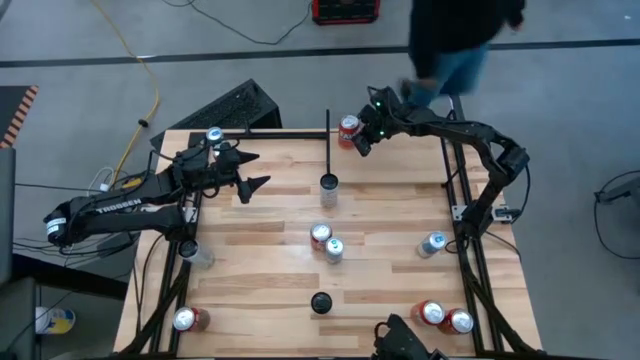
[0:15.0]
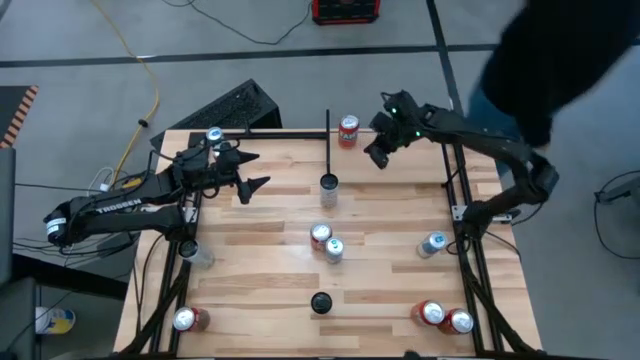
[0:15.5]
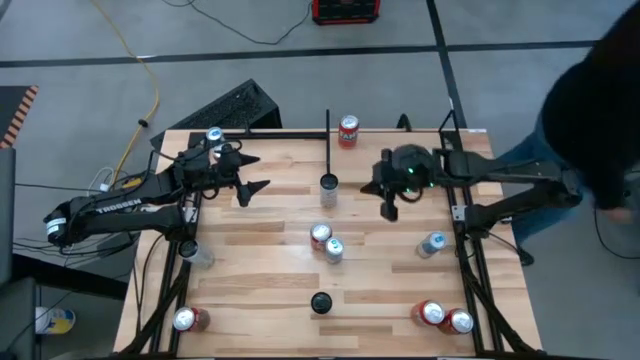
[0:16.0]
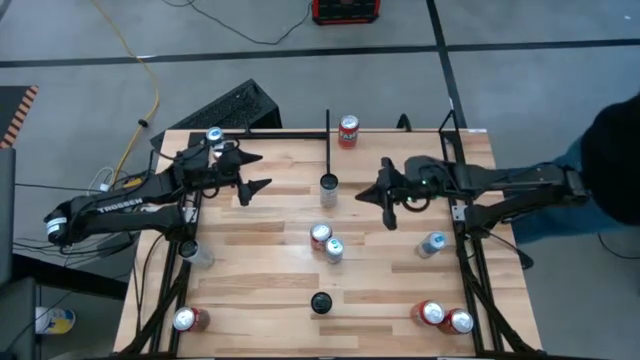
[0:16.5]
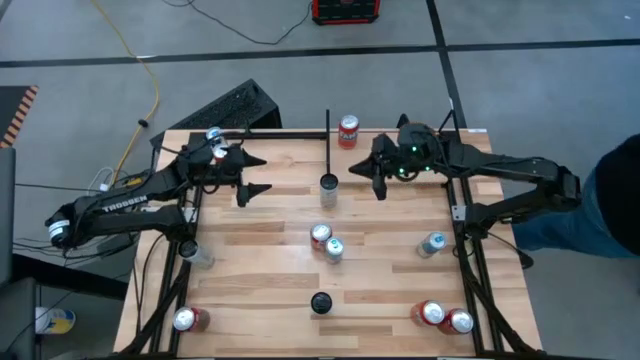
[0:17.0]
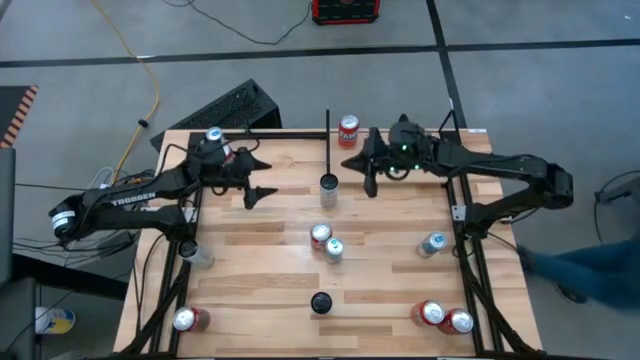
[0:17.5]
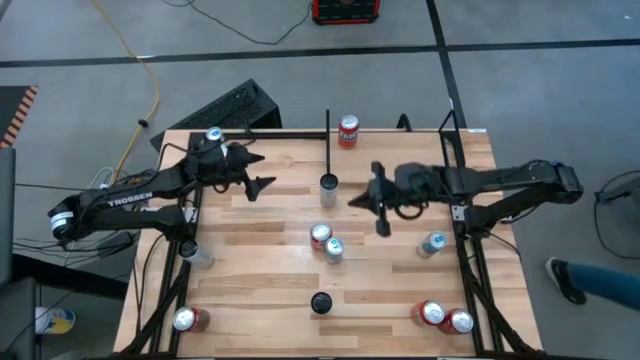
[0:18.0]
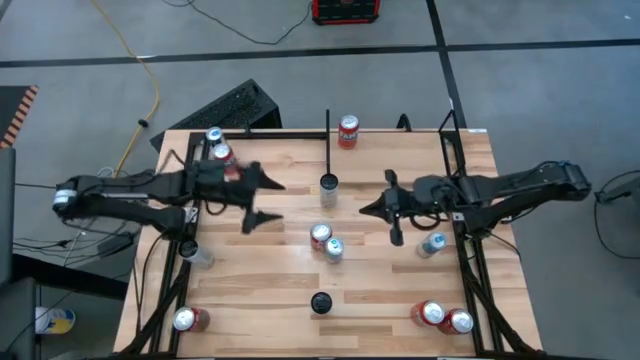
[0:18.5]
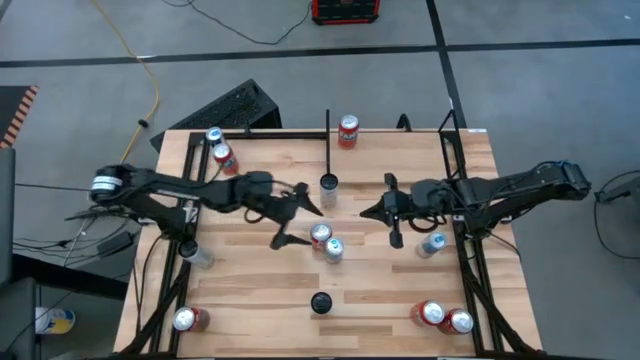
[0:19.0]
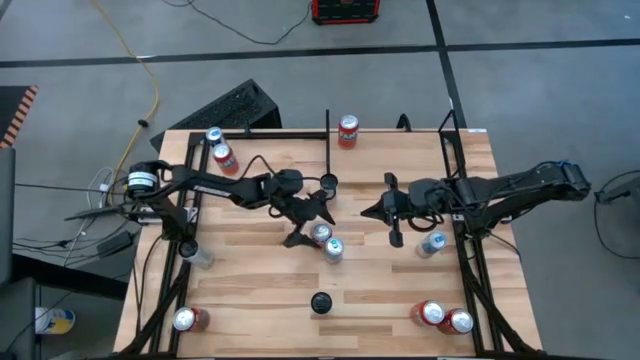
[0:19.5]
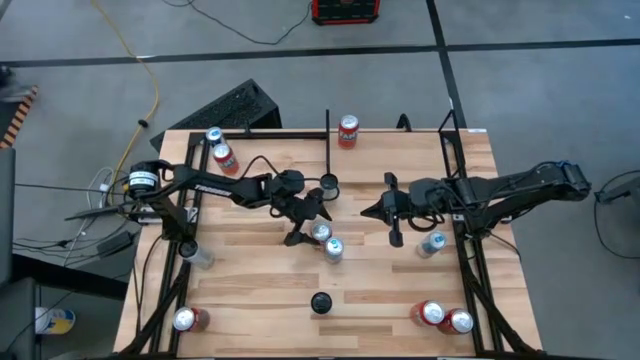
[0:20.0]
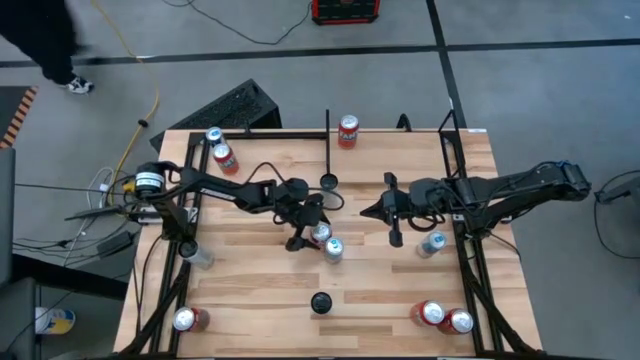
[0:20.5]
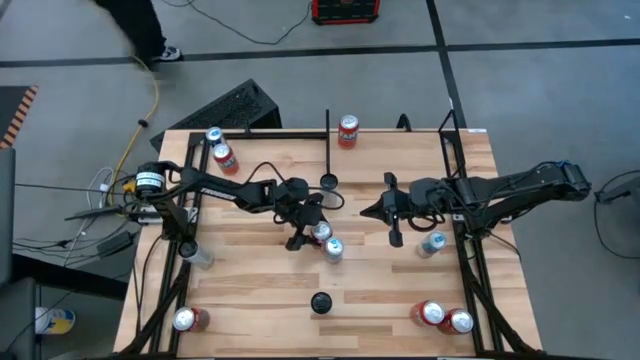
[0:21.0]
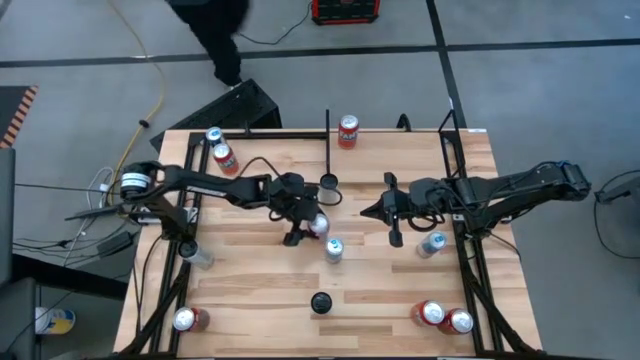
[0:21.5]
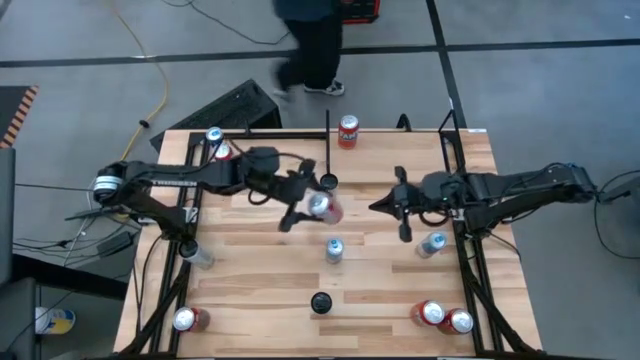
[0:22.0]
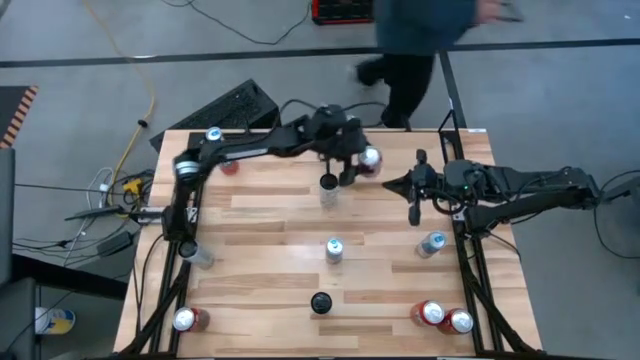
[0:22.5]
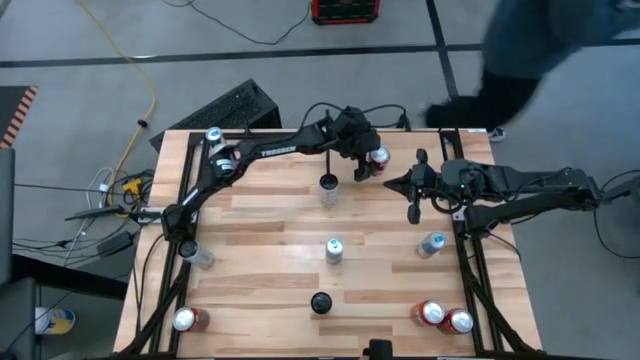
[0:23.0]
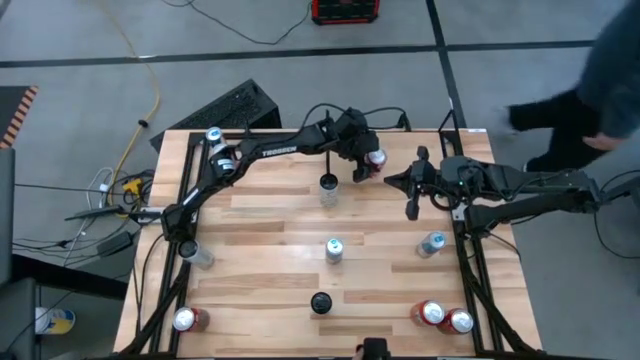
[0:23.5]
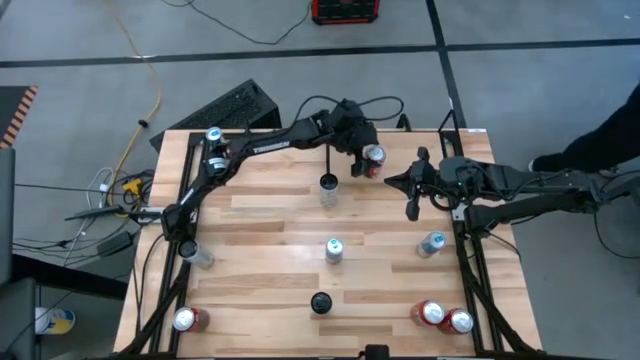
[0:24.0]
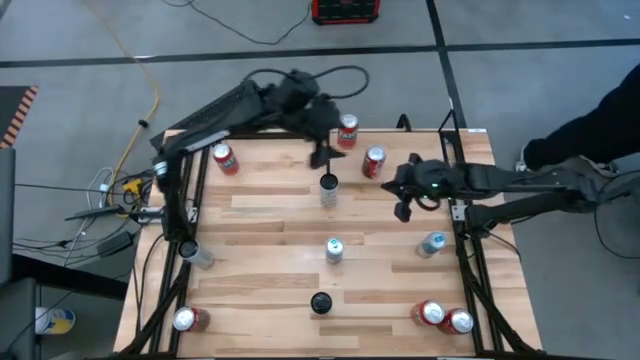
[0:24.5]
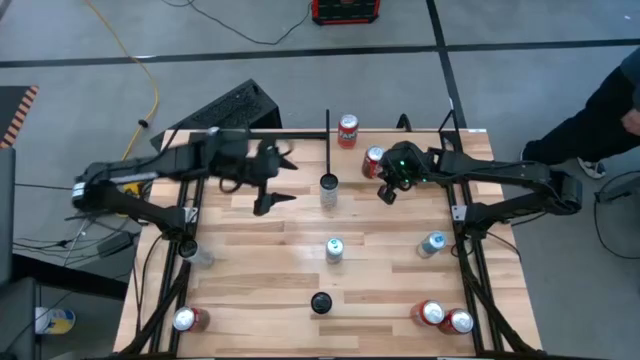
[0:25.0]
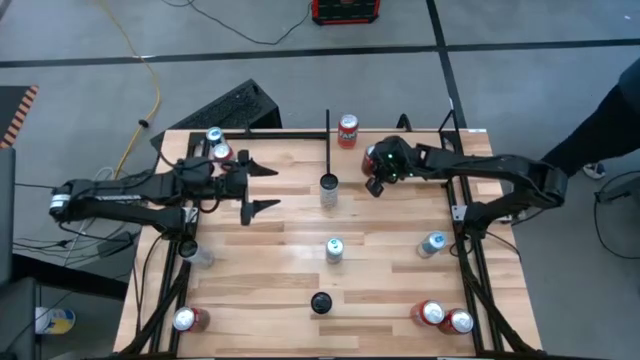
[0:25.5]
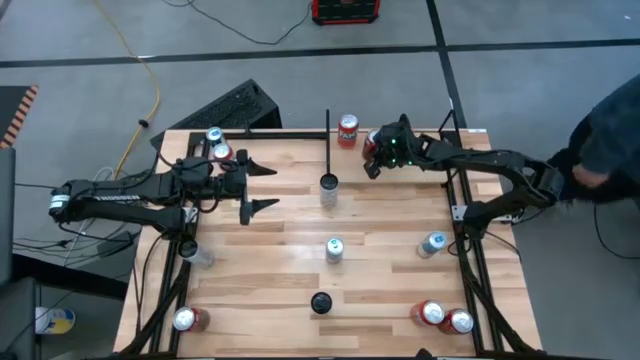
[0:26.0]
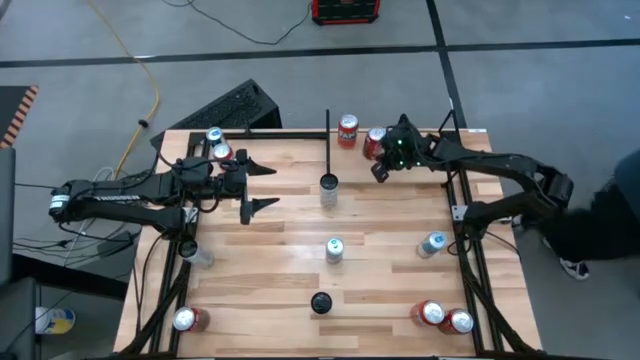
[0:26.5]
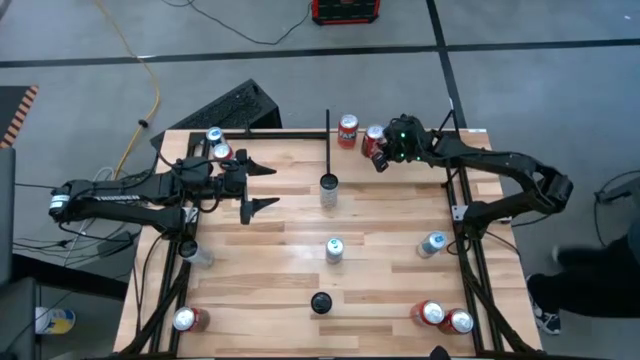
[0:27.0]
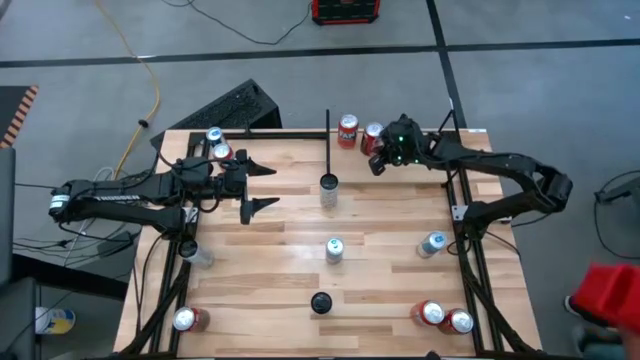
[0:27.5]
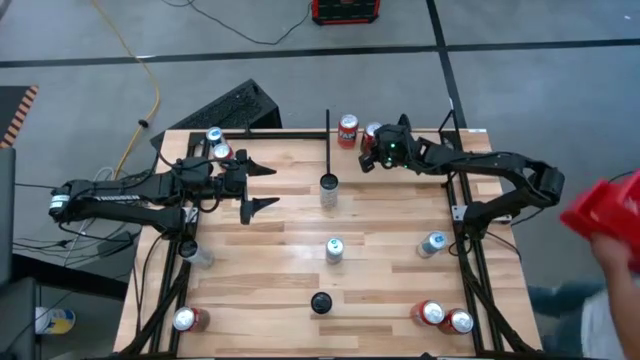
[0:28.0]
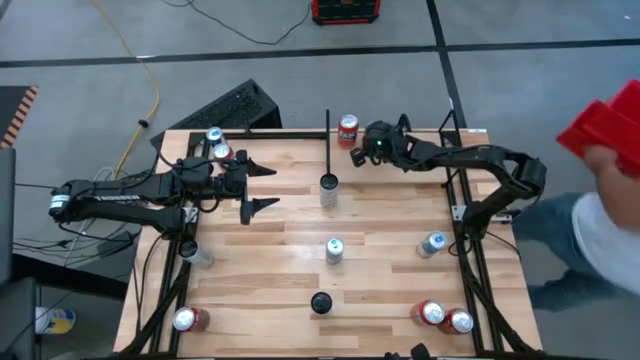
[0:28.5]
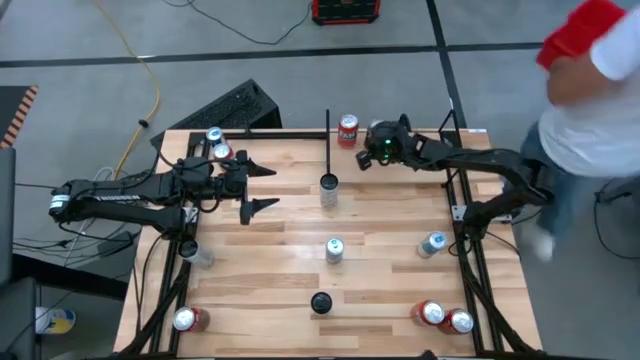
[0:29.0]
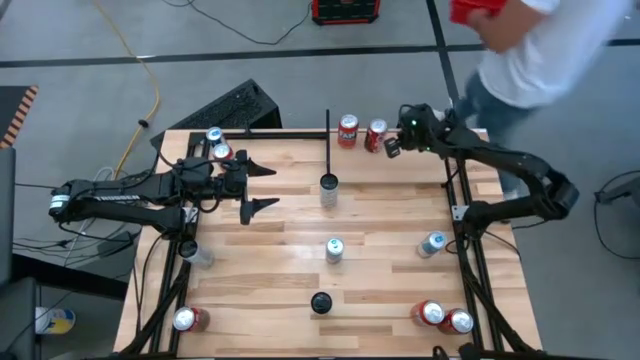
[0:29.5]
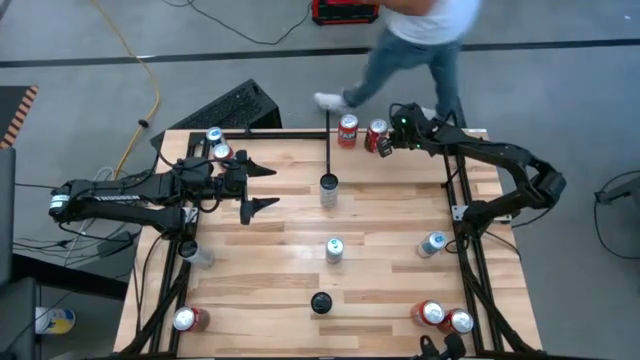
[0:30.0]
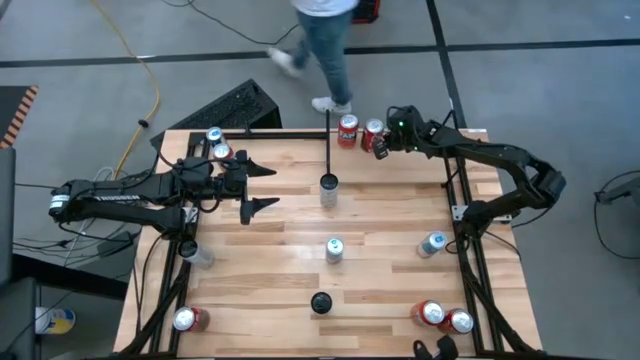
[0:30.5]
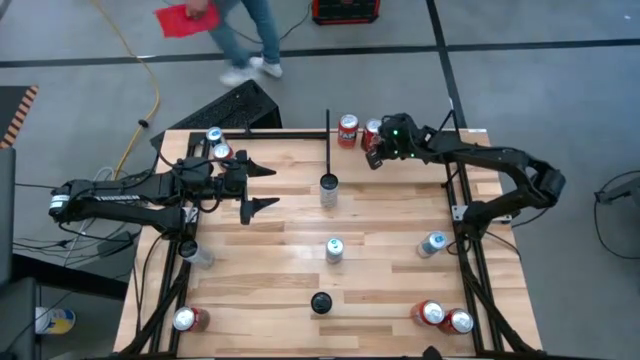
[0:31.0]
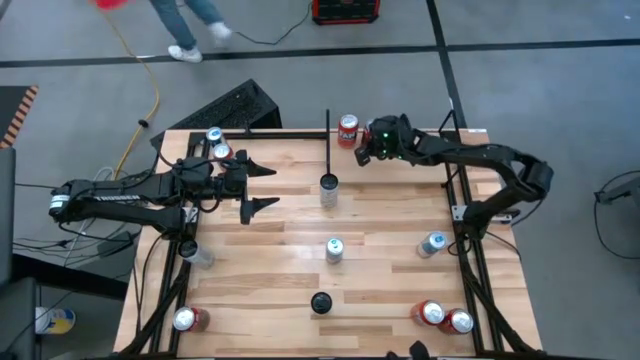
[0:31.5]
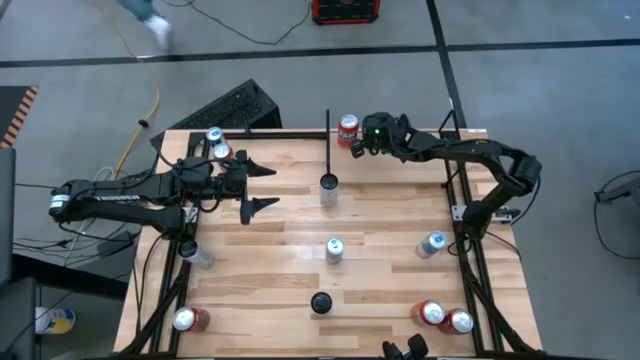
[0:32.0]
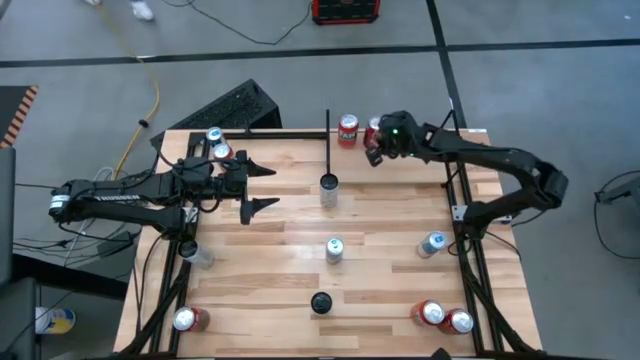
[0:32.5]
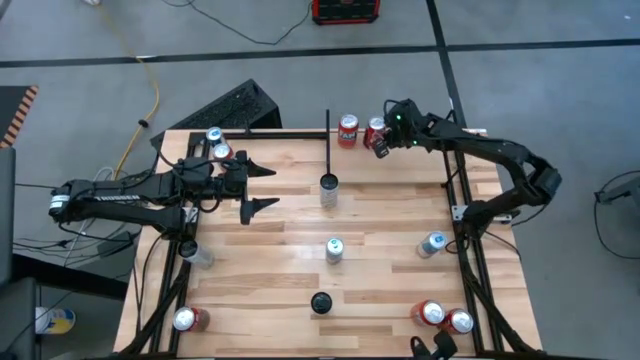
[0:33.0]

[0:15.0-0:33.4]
Task: Place canned beverage on shelf
Put the top red-white soda can on the shelf
